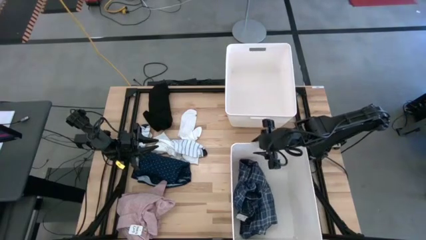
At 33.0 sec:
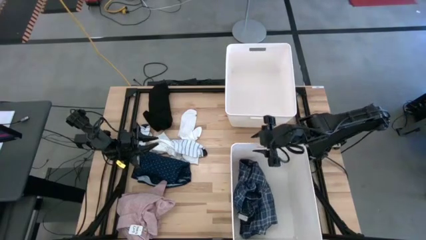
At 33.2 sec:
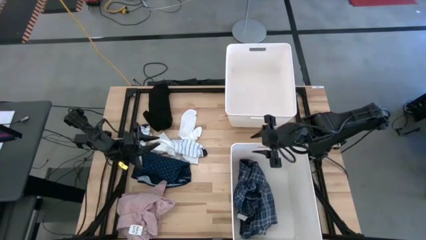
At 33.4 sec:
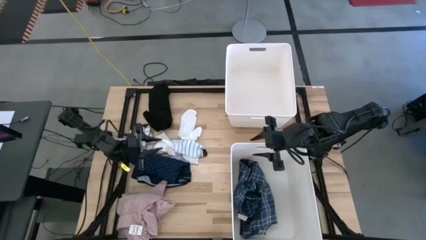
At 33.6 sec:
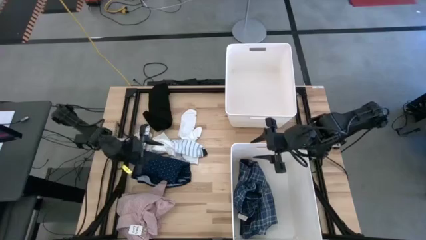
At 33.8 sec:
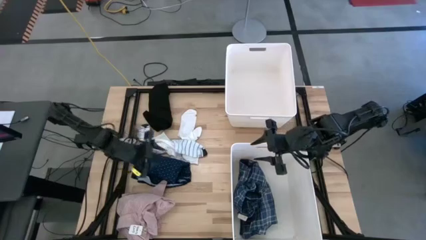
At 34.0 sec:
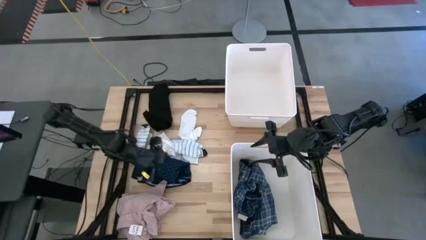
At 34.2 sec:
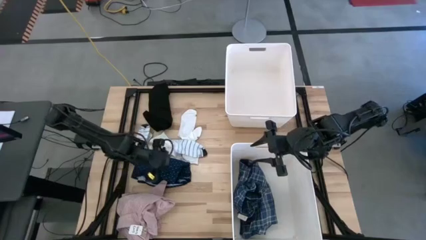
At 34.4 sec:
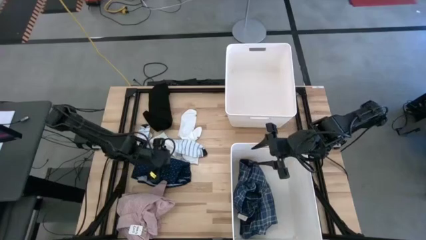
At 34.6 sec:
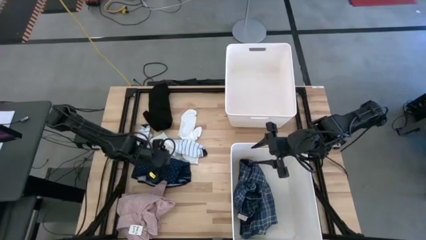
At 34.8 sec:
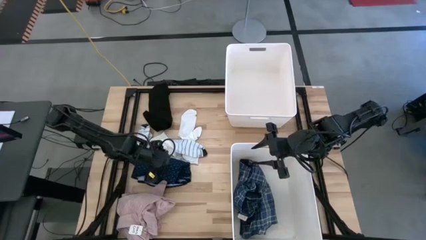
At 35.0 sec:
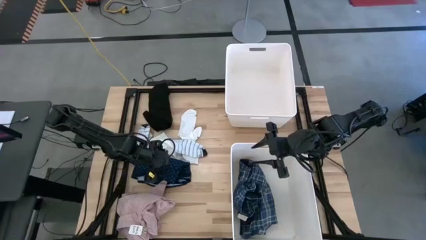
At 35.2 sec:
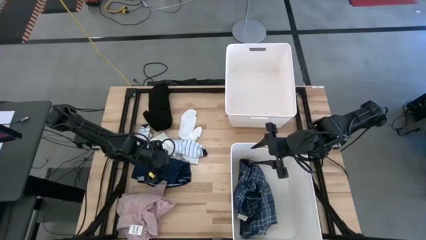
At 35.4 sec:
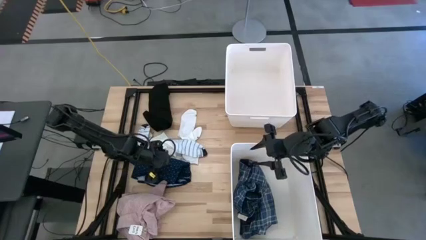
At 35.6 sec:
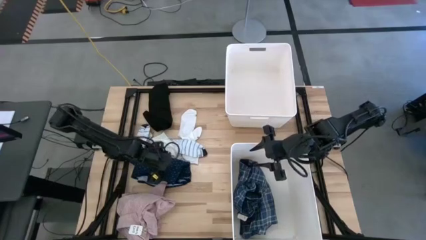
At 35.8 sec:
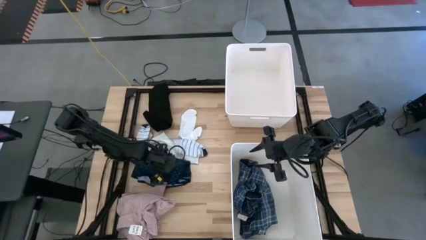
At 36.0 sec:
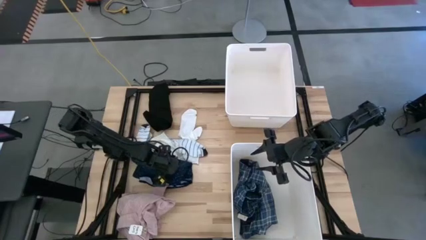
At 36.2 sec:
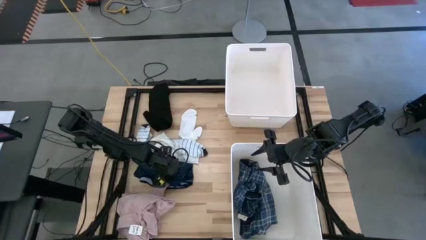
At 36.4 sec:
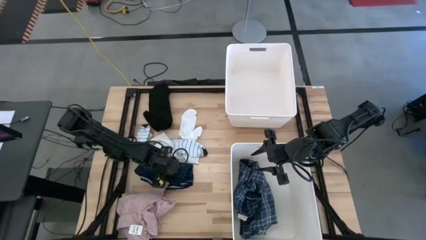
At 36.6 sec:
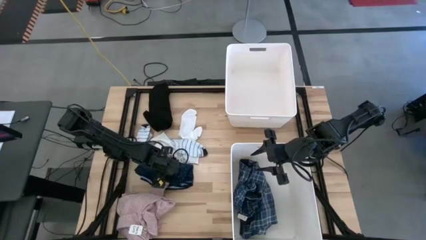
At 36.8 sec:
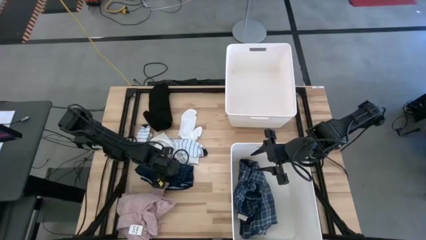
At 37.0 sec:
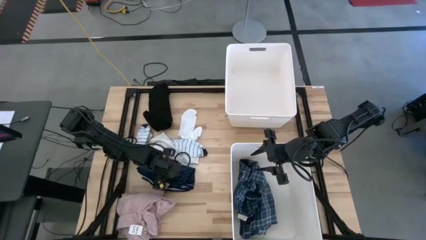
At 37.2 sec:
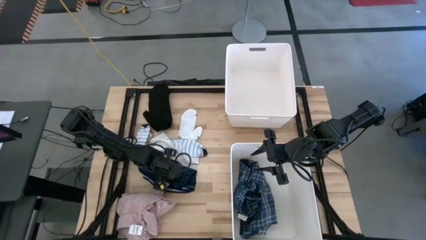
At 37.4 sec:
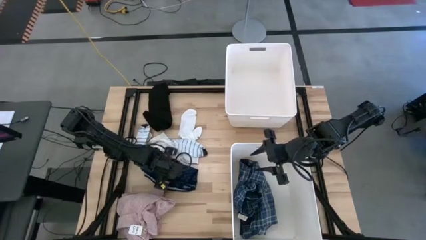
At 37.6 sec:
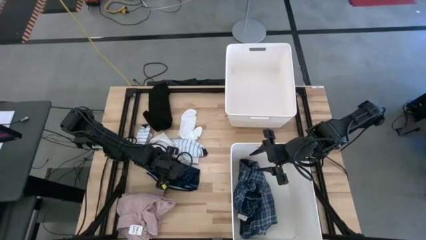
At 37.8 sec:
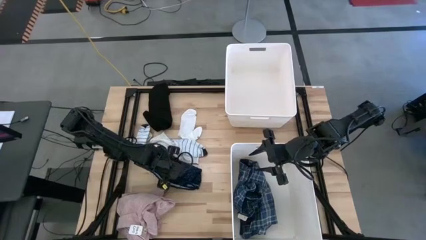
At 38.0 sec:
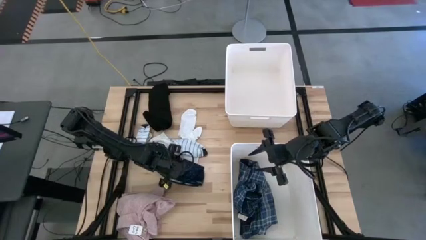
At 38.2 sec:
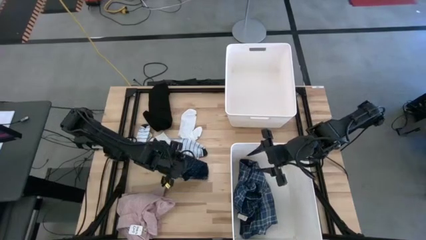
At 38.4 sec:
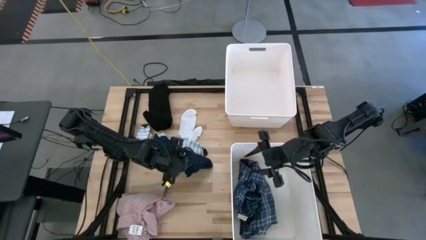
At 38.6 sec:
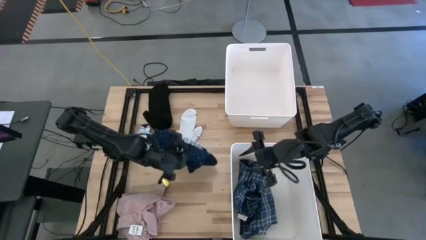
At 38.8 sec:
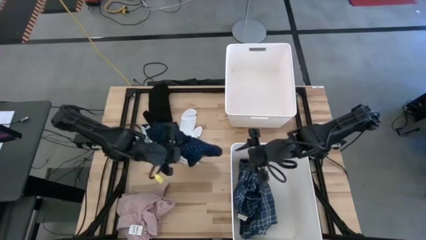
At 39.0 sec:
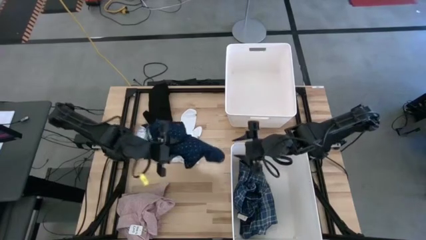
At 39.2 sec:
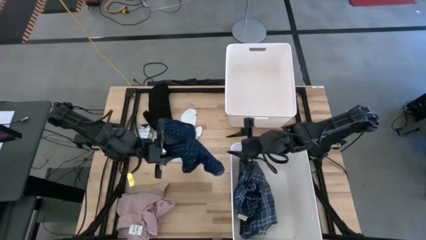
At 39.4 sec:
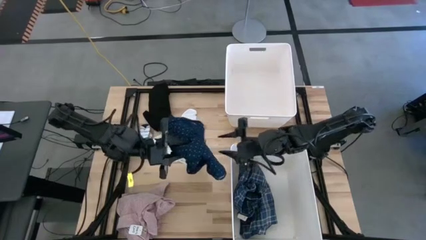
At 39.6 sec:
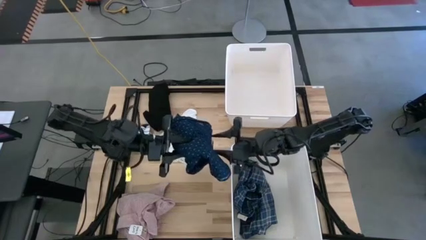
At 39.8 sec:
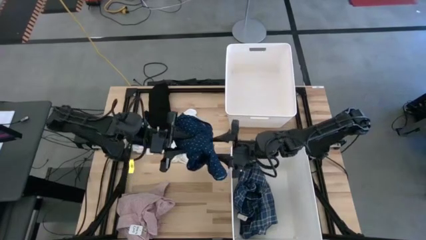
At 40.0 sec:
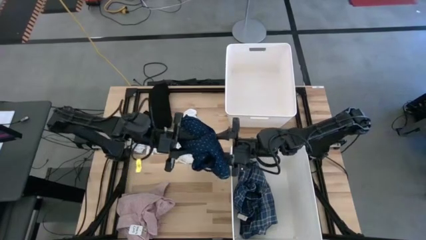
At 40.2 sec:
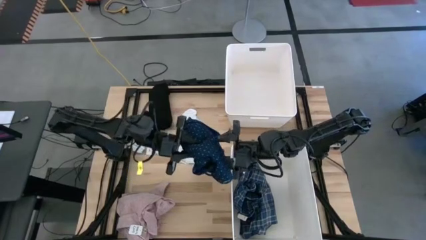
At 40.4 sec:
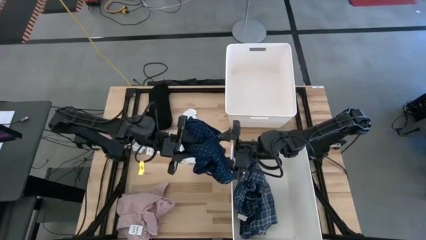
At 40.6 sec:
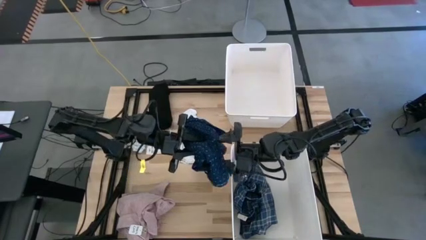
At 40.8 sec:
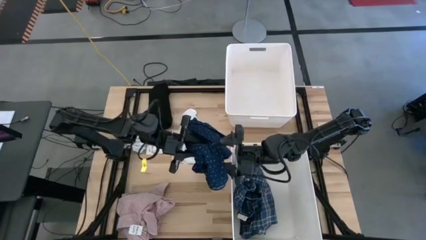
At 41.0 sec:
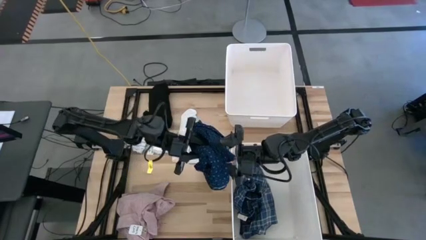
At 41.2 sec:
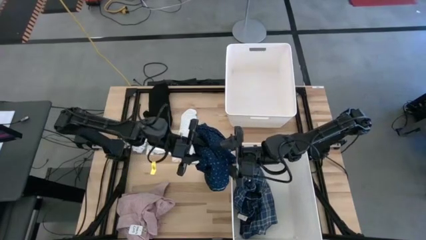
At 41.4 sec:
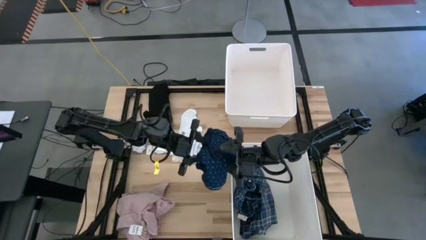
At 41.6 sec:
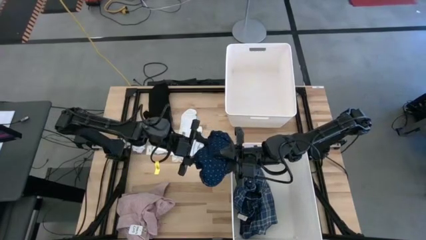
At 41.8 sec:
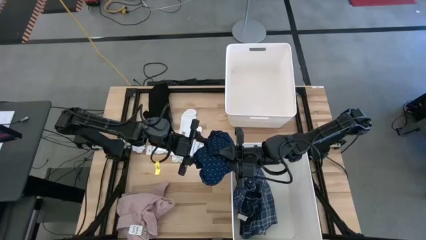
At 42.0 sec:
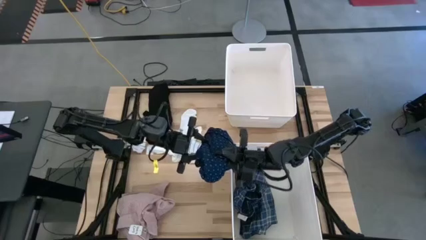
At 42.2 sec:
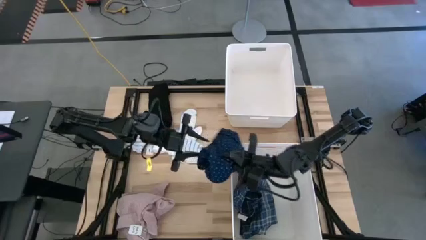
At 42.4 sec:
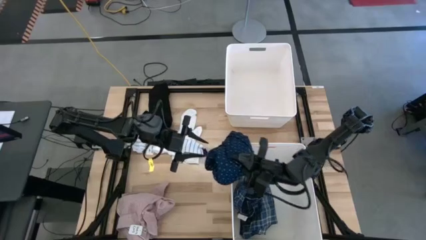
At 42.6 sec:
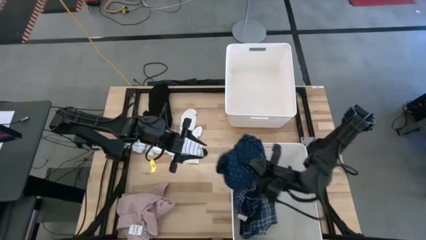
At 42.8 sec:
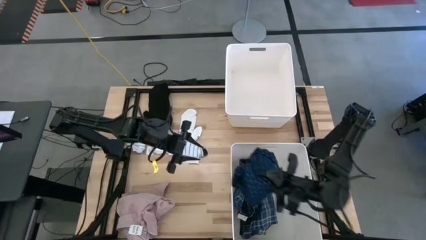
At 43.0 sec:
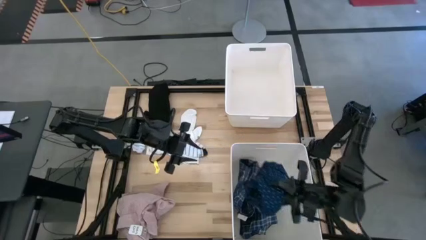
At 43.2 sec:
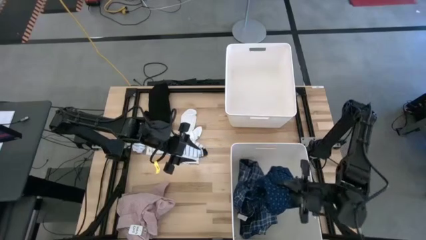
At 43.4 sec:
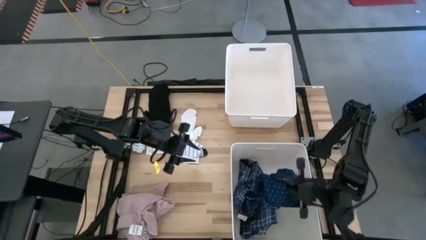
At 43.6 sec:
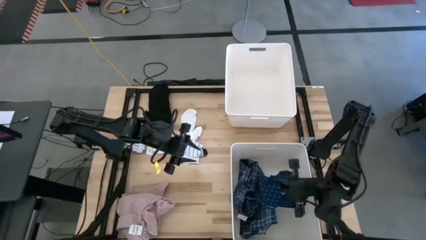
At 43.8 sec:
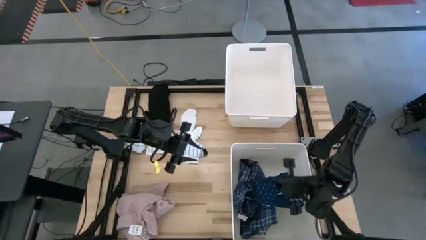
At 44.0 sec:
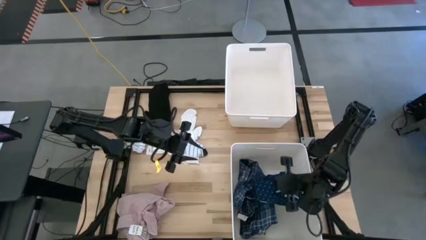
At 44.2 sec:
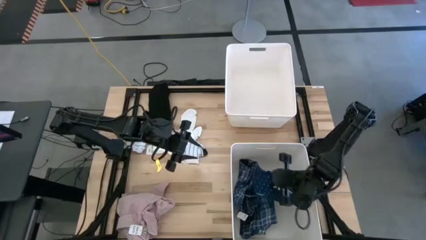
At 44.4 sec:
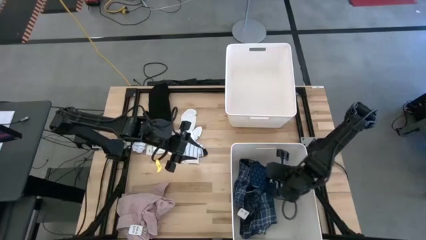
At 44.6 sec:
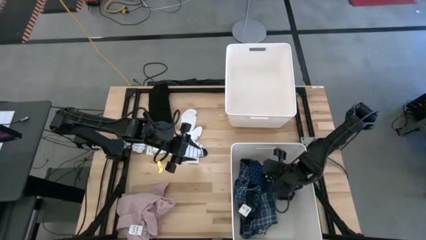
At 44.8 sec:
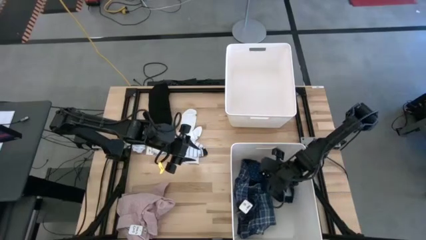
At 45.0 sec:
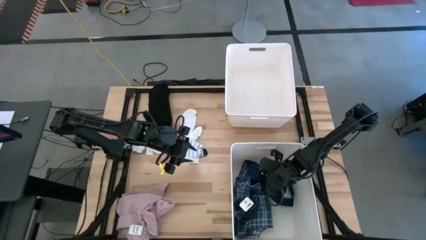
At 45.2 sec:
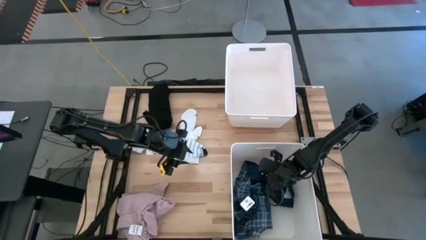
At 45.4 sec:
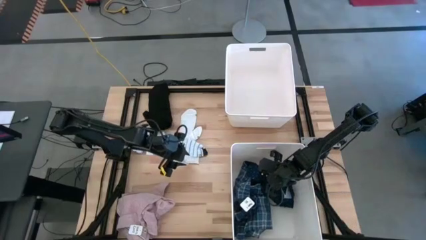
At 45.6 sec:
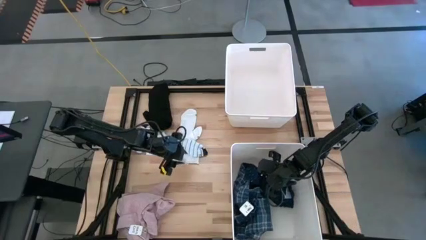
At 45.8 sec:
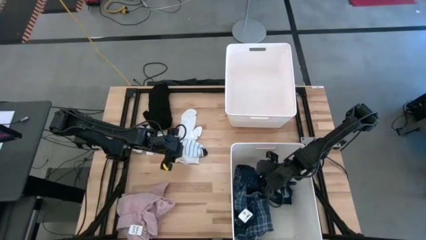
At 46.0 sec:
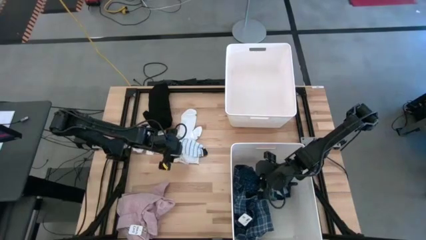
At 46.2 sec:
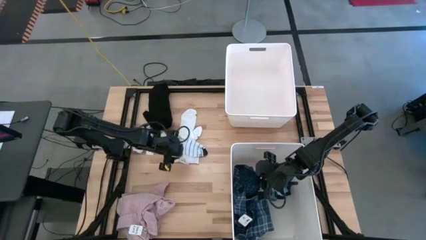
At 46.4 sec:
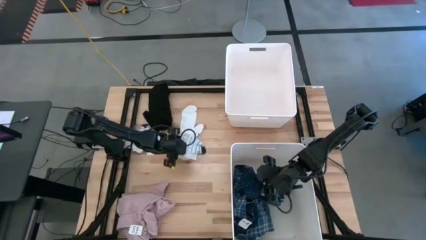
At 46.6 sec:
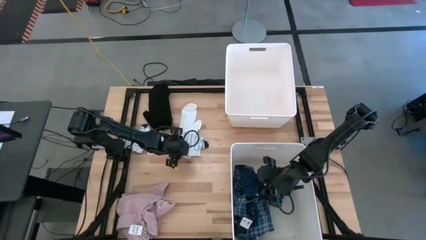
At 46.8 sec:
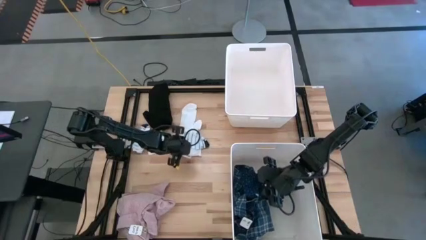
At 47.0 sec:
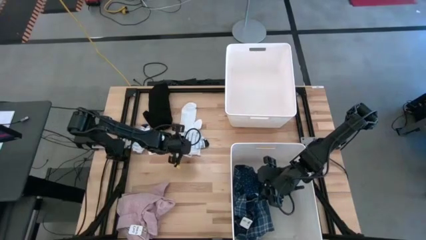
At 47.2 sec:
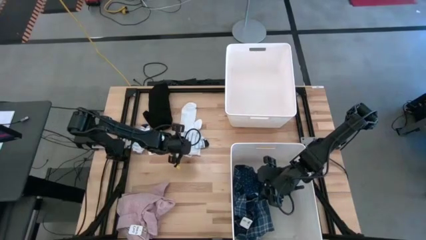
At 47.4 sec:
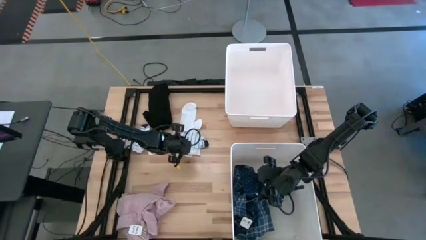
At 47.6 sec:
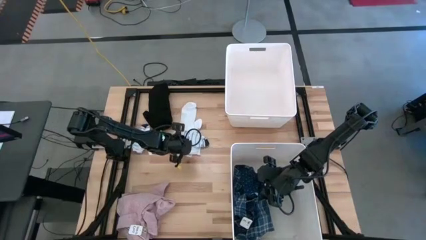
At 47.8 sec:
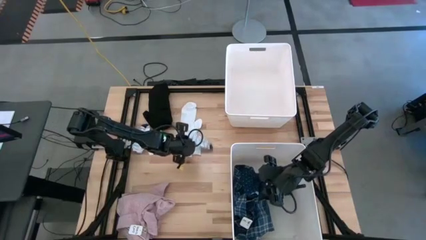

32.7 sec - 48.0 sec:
Task: Sort clothes
Put the blue polo shirt into the bottom white laundry bin

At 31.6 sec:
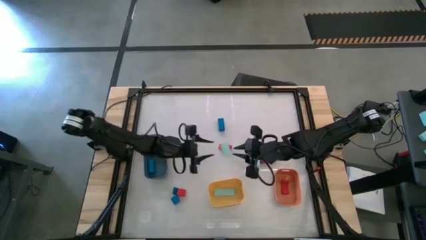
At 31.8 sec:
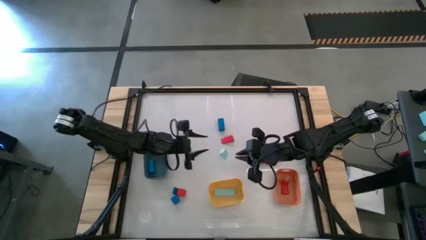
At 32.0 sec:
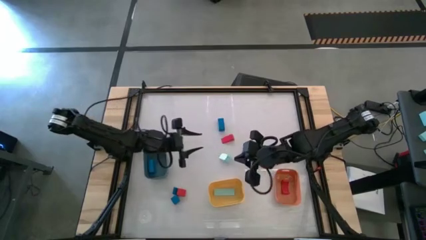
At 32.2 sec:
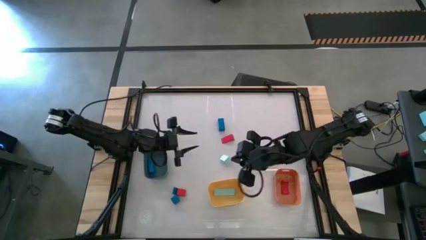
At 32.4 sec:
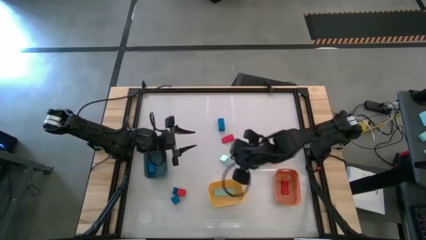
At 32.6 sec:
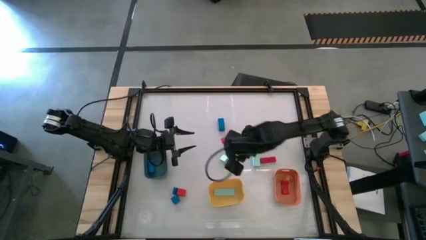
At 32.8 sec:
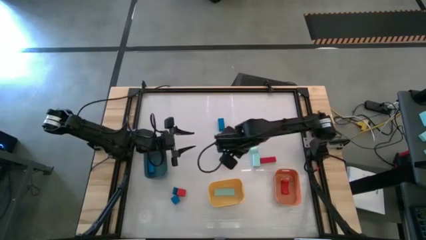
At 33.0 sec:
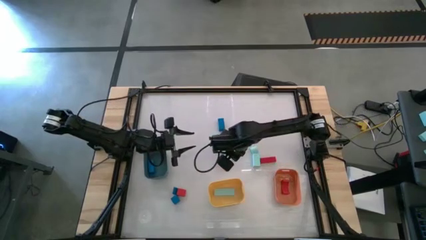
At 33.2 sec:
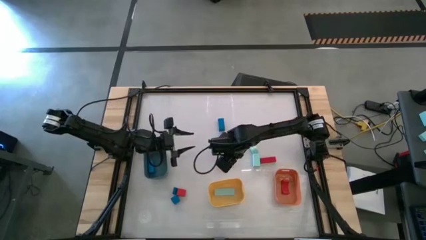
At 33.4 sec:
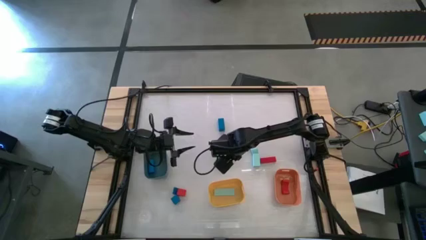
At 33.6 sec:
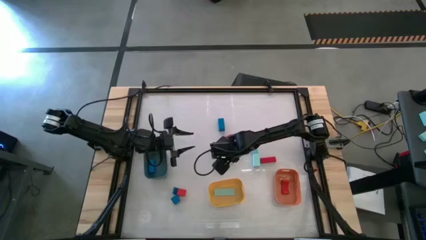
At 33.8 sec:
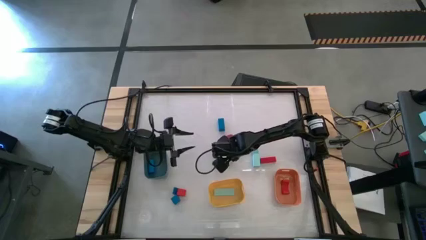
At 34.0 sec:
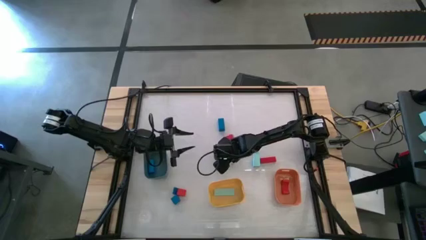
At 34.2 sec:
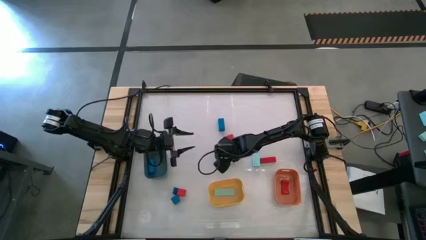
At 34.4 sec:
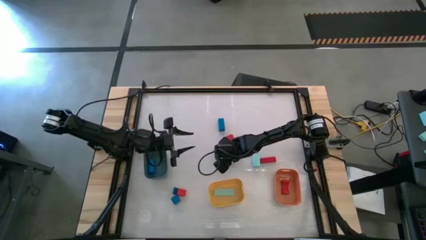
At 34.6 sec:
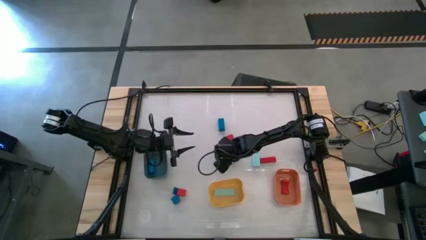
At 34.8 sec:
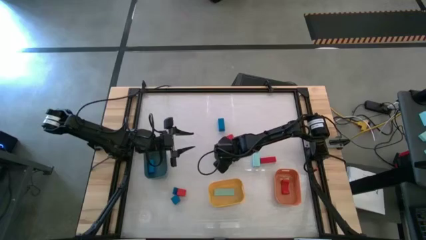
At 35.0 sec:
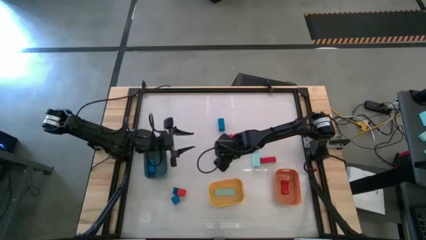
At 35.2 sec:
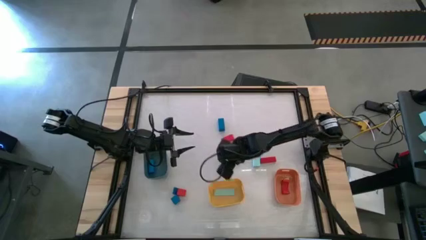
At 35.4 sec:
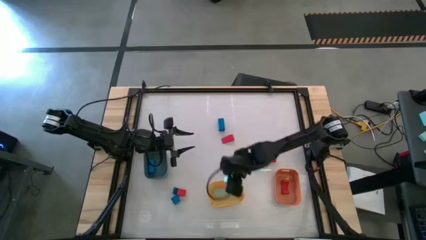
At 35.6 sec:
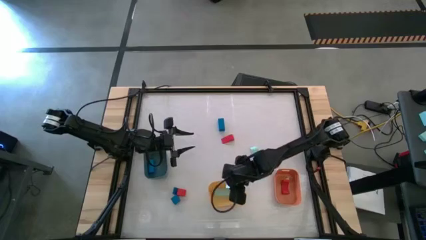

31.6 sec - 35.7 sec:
Task: Sort & place blocks by color
Put the light blue block into the yellow bin
